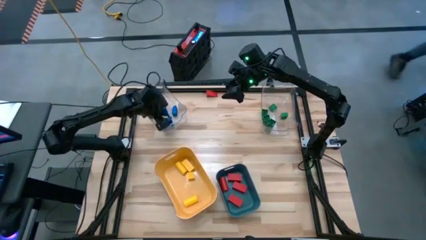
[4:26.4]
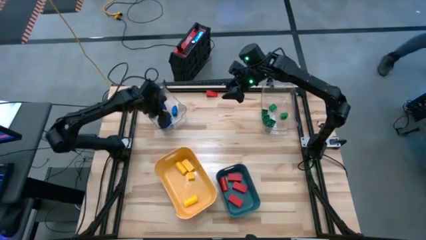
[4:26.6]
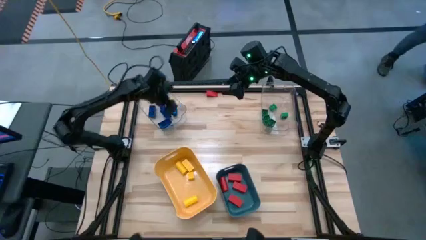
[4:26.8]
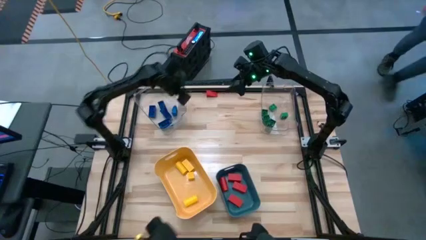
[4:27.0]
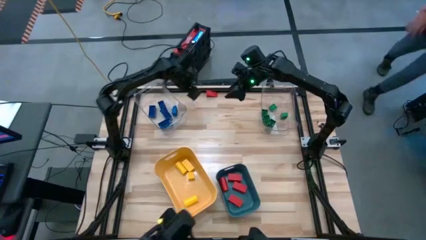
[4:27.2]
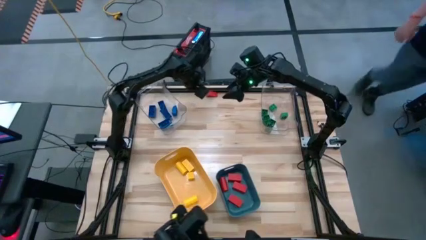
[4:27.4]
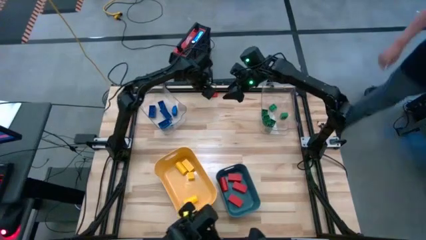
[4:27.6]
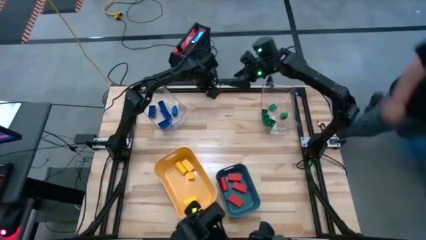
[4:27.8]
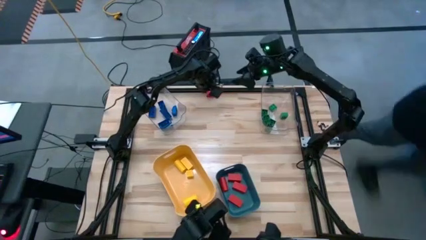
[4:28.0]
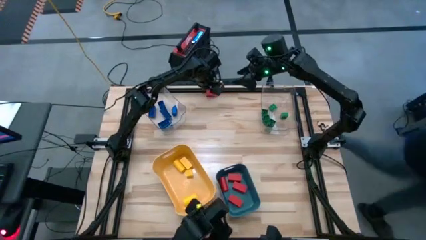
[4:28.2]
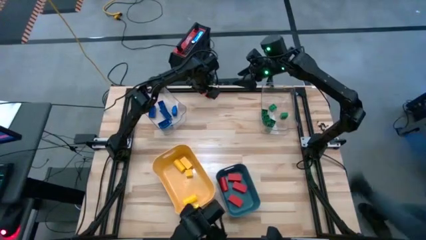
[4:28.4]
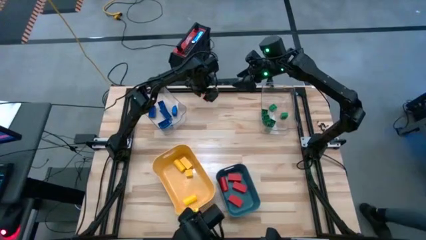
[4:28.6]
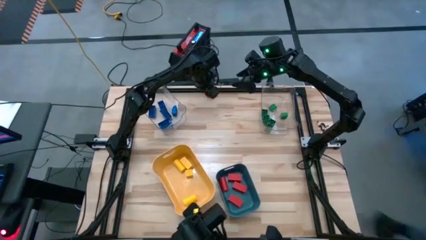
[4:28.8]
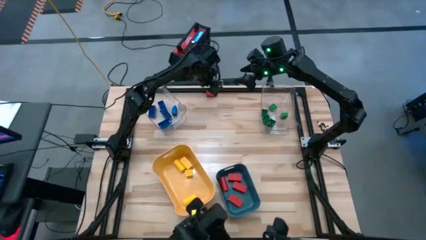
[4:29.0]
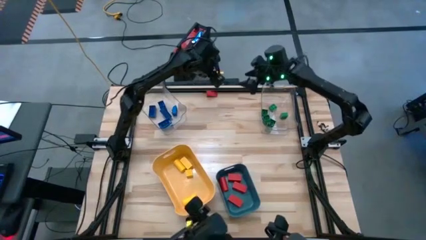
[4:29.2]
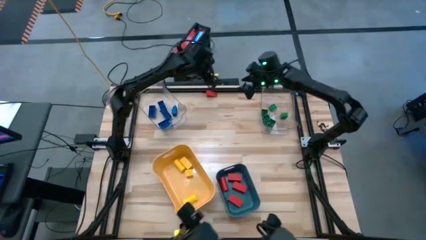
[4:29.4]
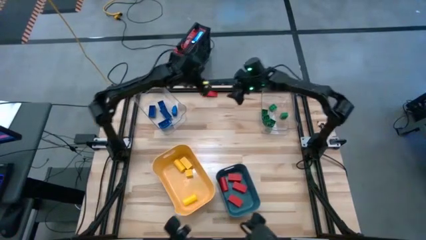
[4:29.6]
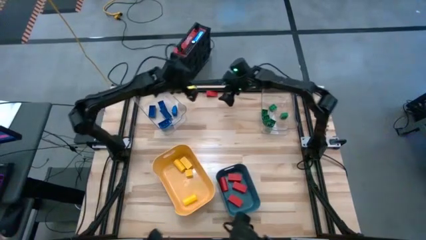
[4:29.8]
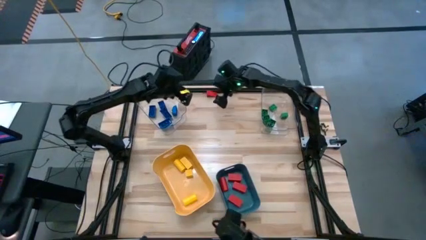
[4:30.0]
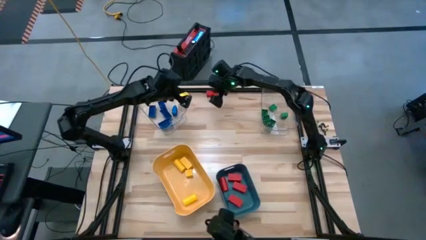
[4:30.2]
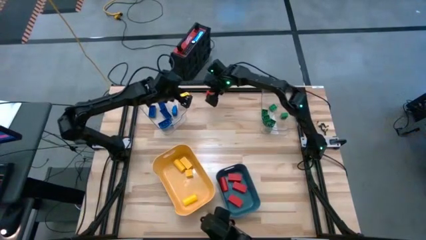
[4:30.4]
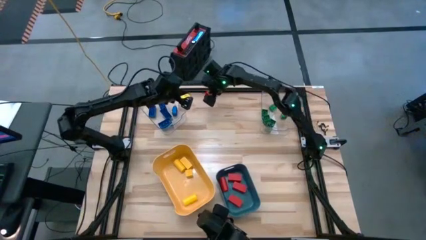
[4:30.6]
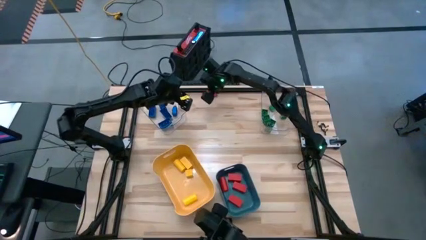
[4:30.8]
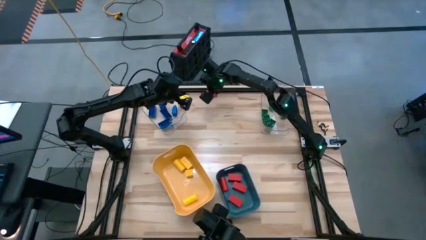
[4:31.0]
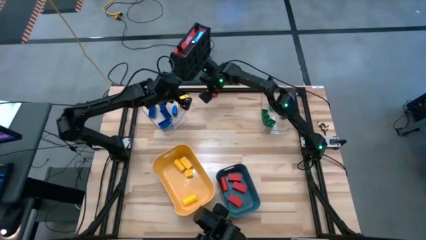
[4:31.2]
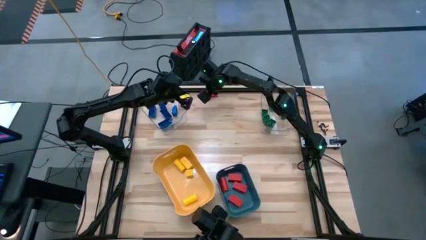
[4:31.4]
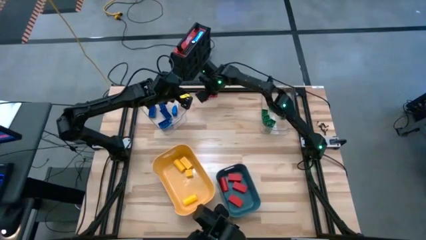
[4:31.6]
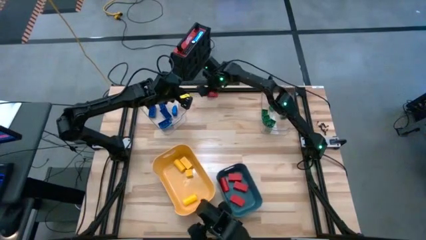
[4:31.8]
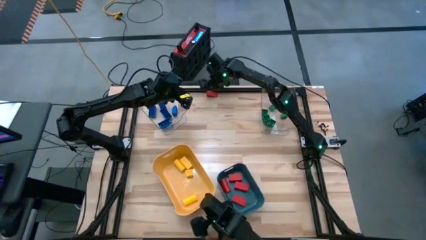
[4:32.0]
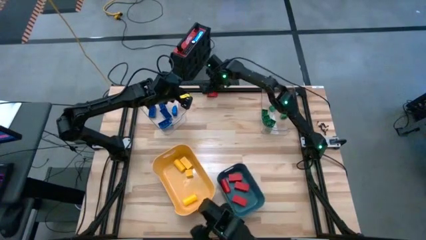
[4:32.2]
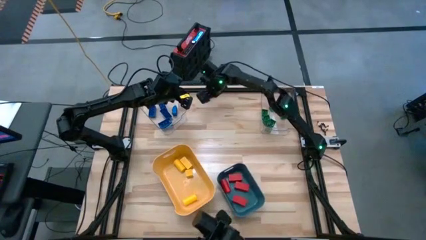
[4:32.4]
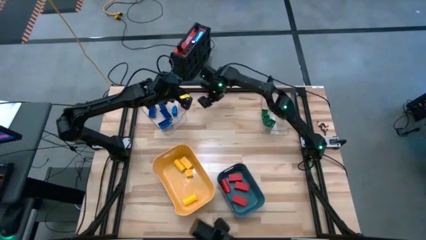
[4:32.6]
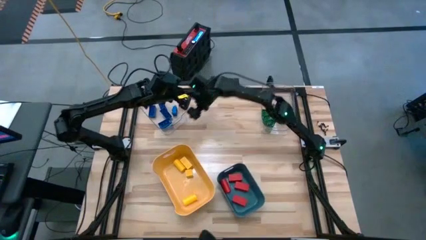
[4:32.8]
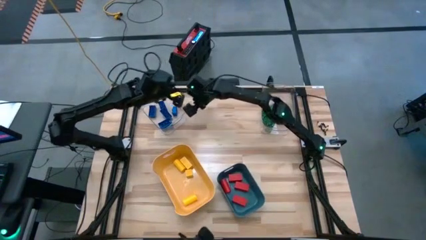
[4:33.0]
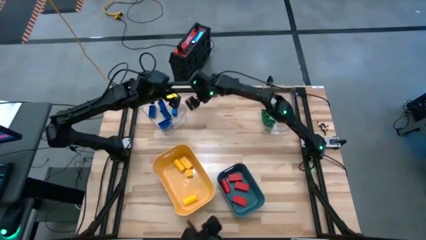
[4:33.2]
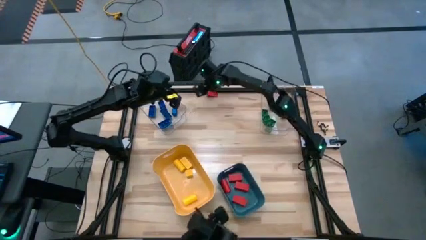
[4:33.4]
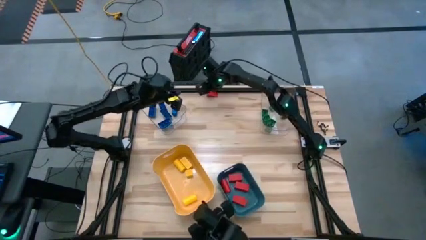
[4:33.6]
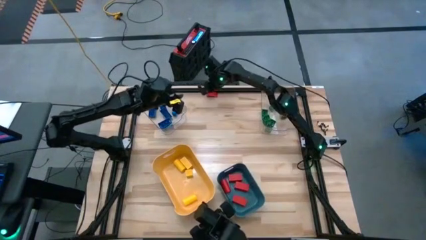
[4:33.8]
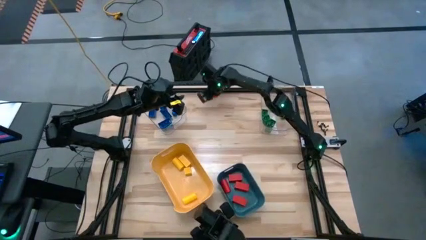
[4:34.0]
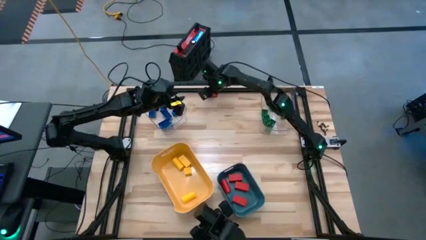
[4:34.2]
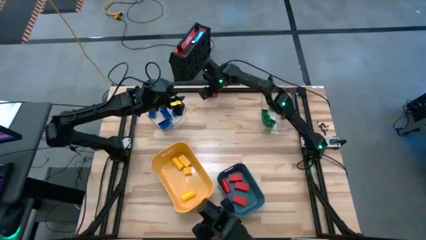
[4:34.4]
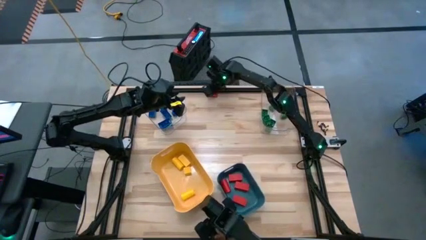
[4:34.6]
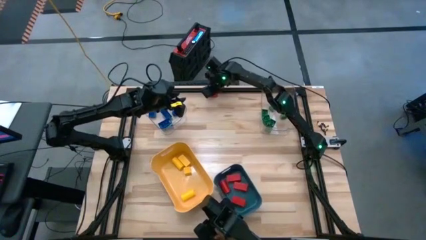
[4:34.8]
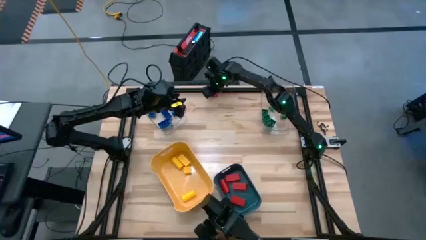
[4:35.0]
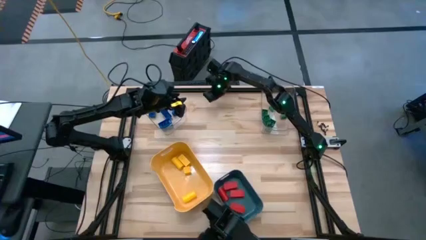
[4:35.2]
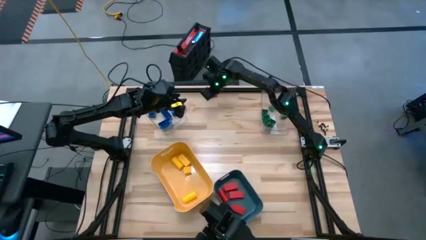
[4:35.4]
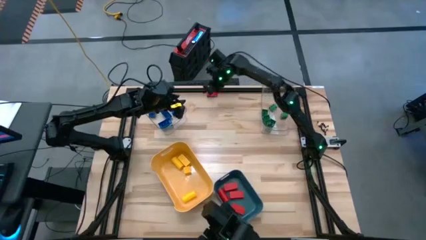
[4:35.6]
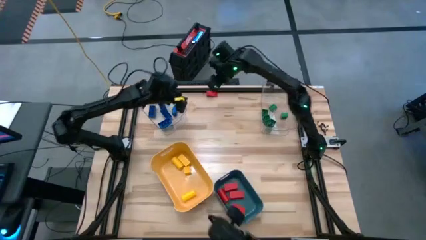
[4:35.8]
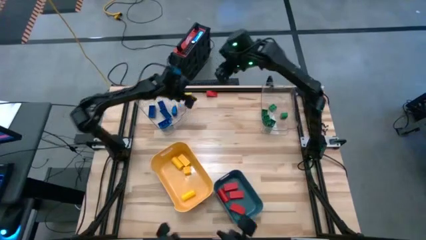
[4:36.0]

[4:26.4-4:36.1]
Task: Sort blocks
Put the red block into the blue bin

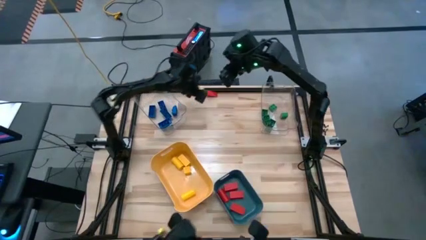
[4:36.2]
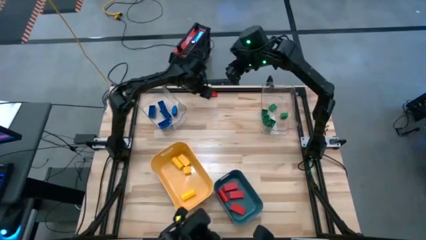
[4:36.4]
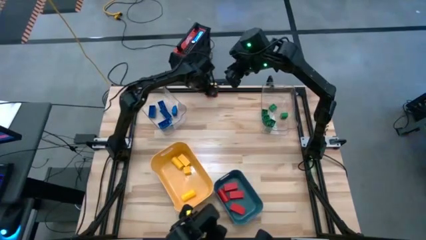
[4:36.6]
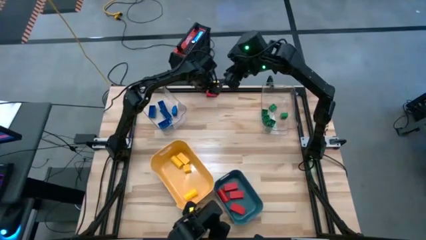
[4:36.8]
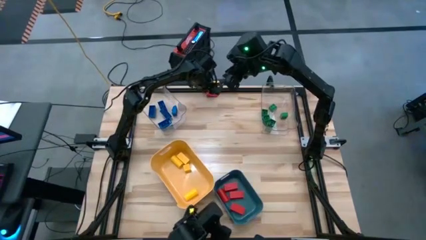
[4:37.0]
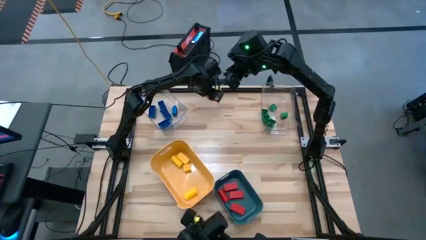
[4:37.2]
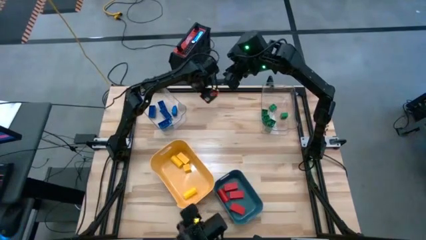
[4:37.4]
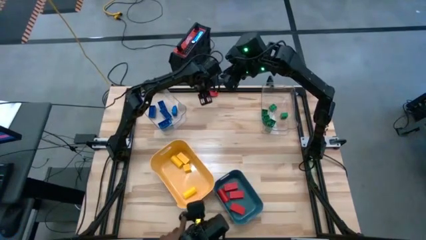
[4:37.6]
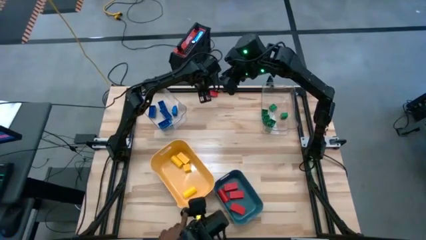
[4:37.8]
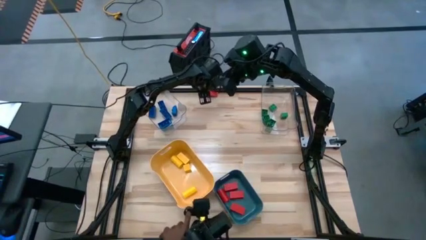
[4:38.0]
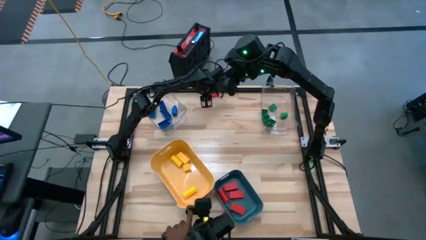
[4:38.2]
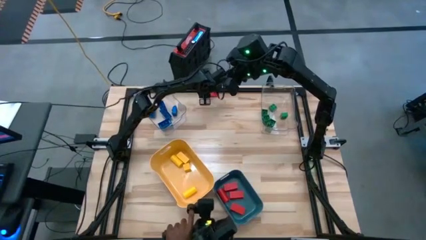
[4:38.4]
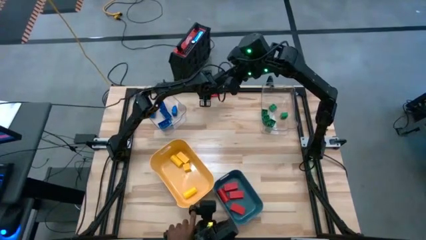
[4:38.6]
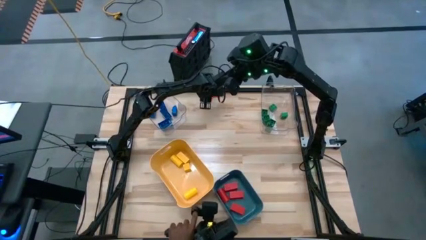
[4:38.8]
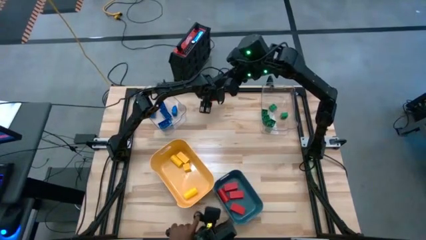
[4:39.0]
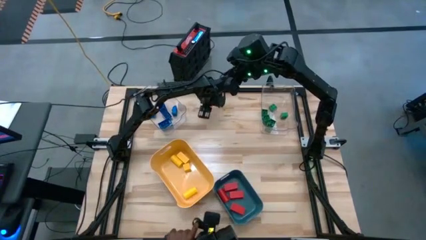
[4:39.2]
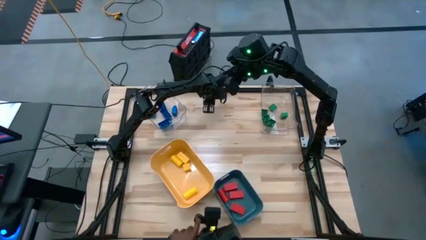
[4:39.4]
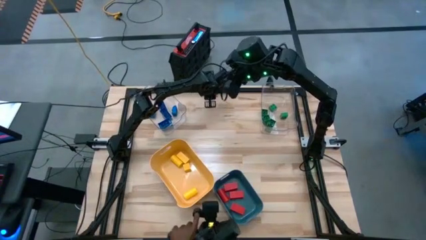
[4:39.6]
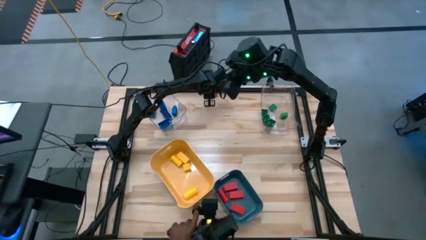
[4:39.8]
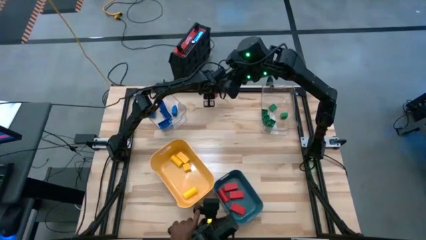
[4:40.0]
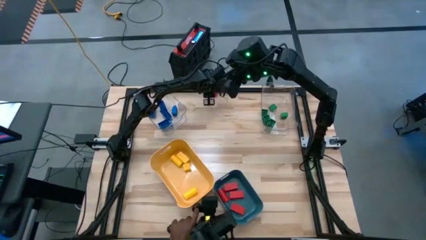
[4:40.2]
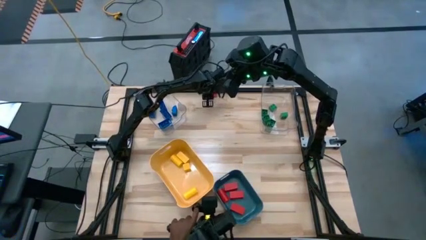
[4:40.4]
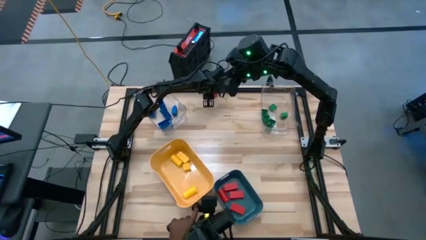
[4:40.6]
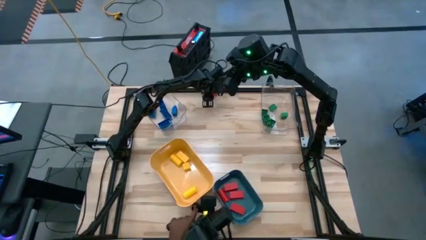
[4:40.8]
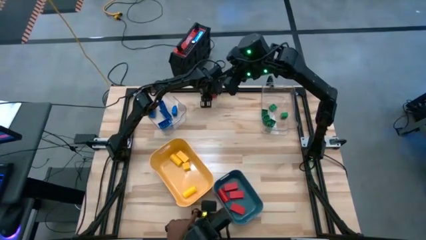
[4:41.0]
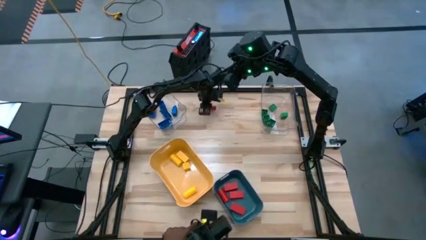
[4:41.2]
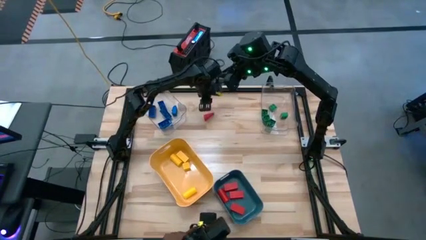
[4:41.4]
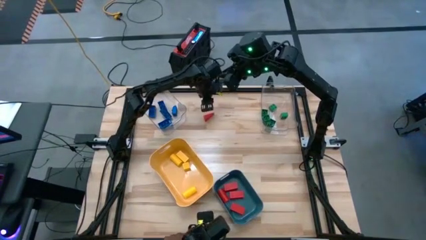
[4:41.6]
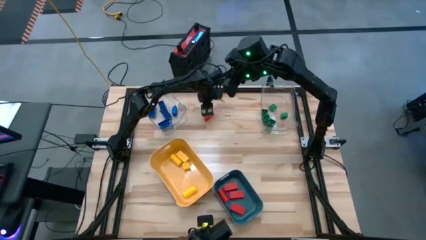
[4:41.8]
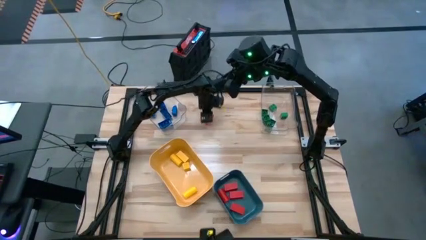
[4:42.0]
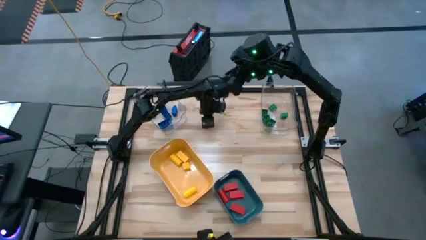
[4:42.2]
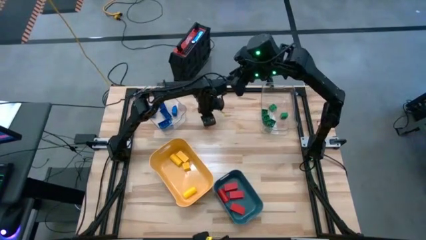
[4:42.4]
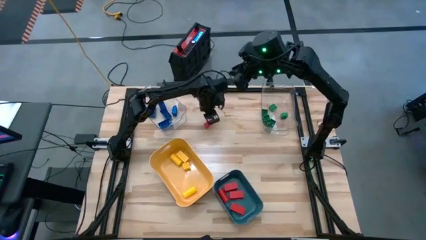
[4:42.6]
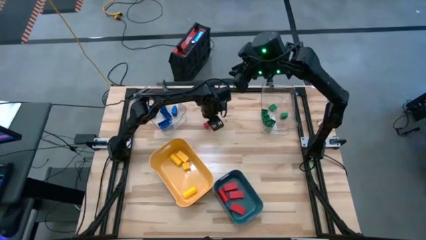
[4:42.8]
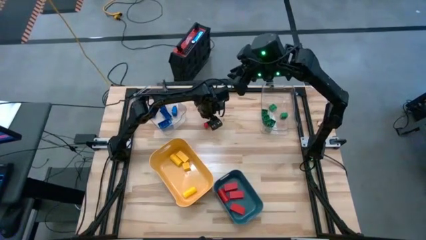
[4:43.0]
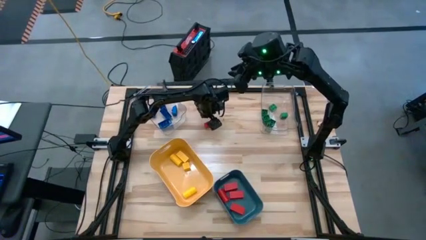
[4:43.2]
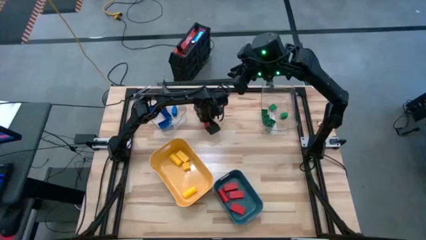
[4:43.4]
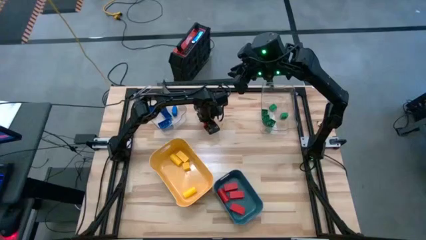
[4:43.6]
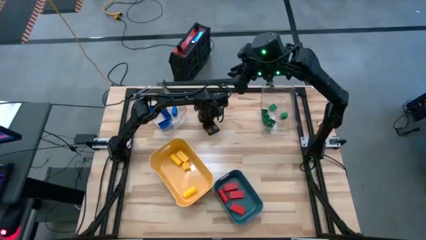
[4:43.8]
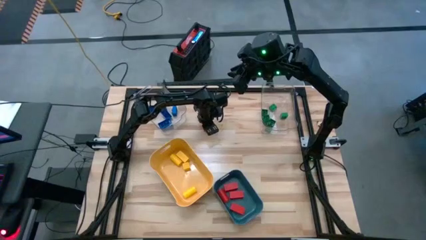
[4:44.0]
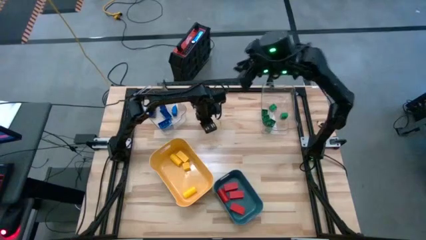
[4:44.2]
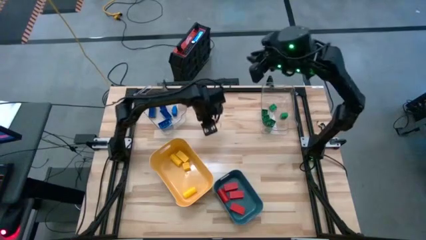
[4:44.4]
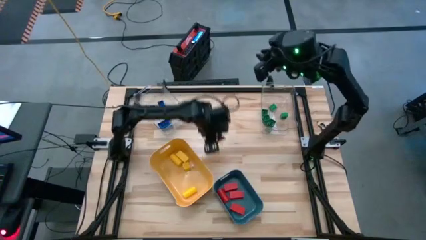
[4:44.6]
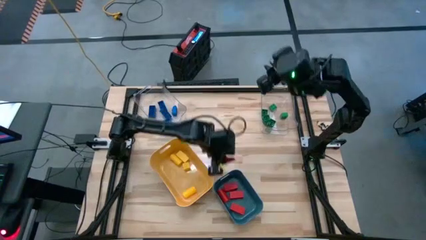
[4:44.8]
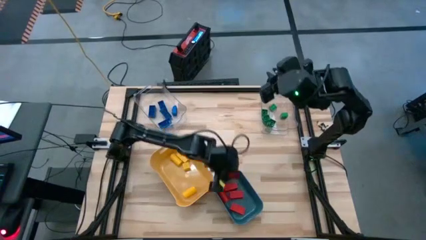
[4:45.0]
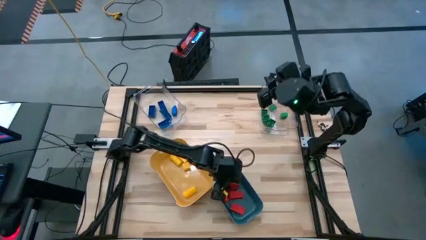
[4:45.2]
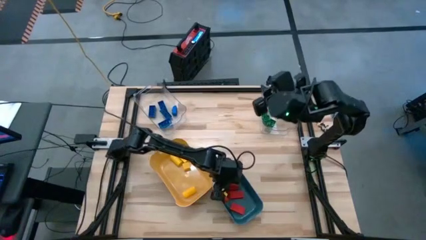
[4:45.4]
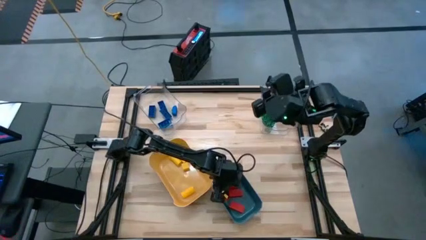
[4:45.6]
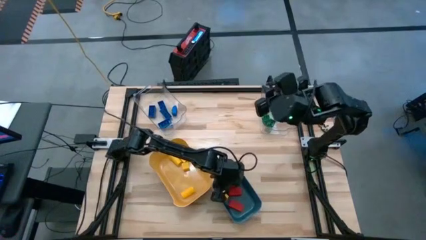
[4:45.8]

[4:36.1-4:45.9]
Put the red block into the blue bin
